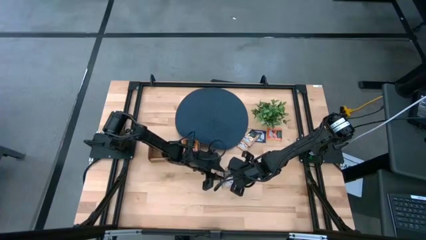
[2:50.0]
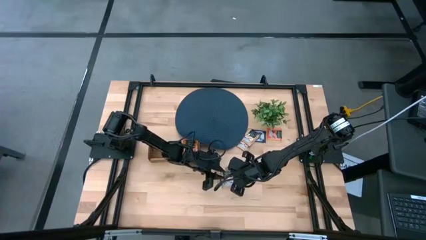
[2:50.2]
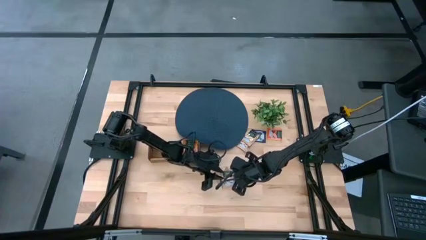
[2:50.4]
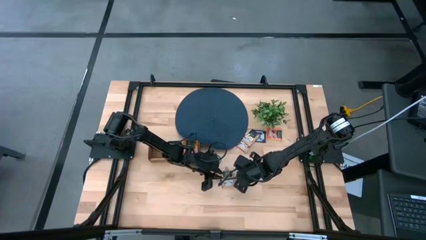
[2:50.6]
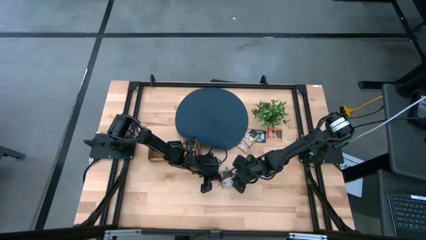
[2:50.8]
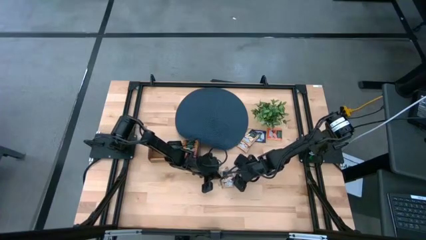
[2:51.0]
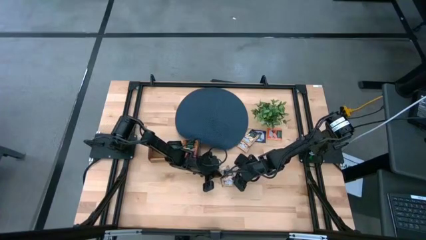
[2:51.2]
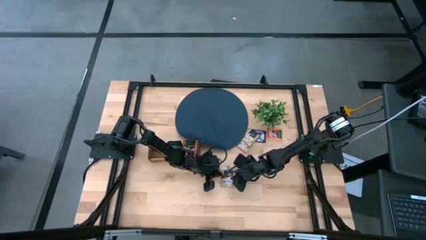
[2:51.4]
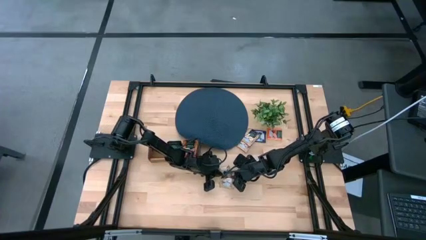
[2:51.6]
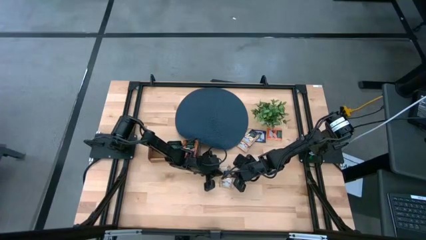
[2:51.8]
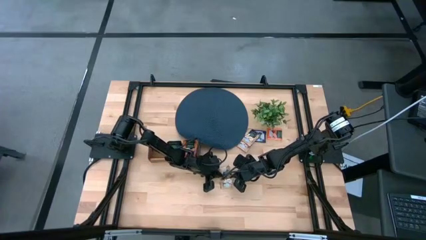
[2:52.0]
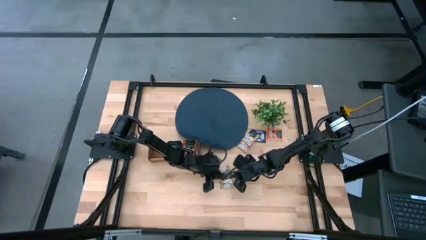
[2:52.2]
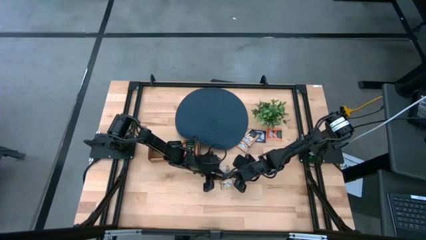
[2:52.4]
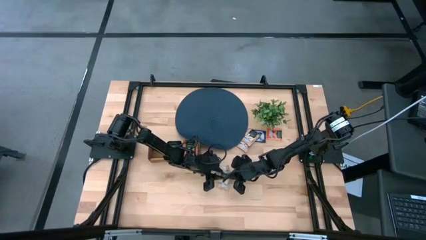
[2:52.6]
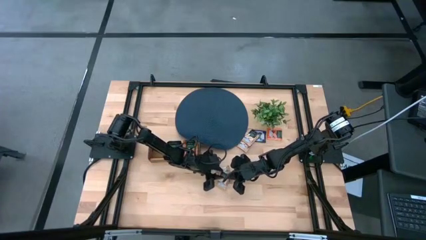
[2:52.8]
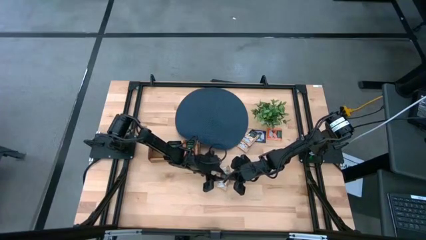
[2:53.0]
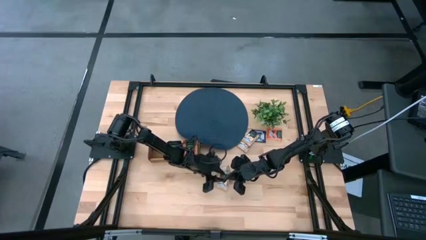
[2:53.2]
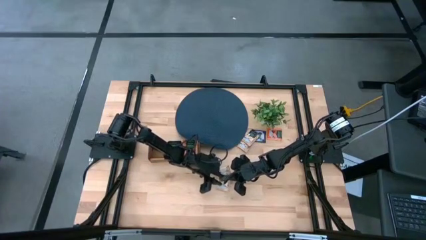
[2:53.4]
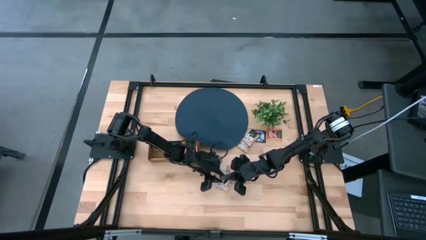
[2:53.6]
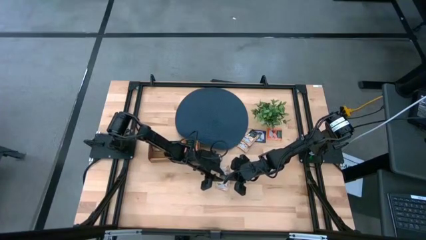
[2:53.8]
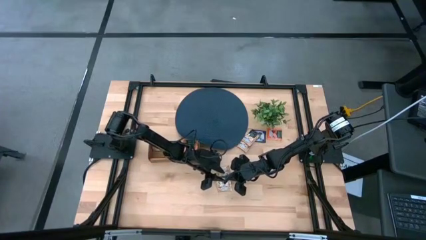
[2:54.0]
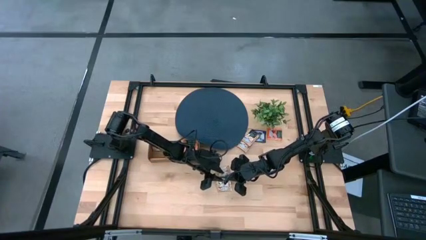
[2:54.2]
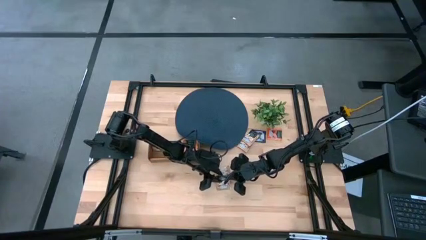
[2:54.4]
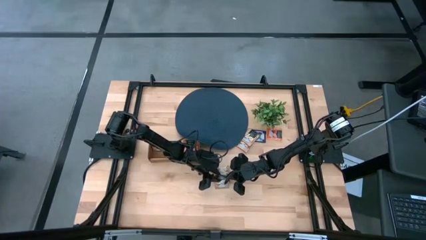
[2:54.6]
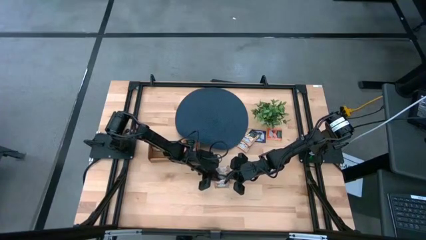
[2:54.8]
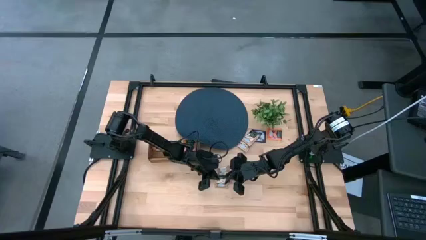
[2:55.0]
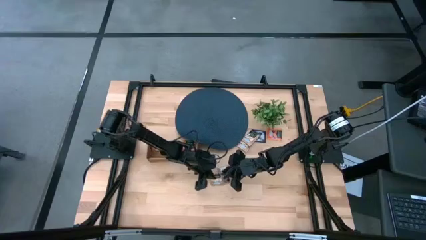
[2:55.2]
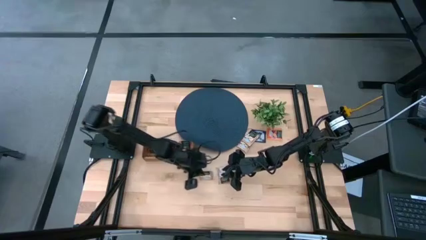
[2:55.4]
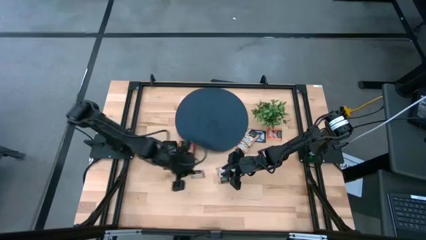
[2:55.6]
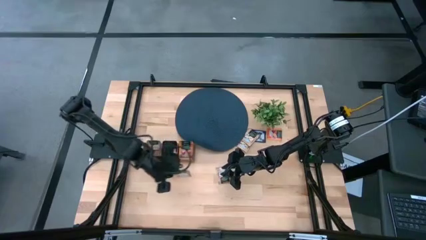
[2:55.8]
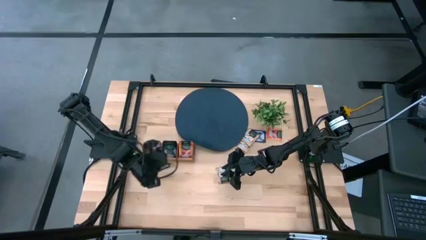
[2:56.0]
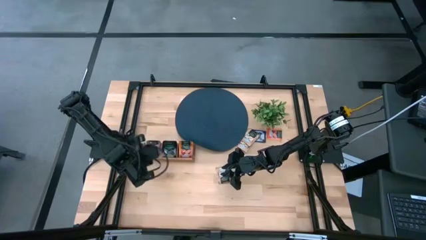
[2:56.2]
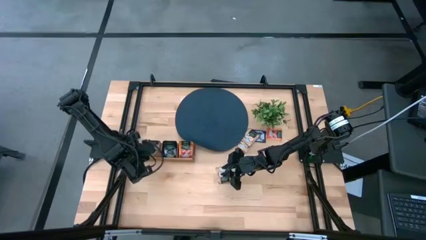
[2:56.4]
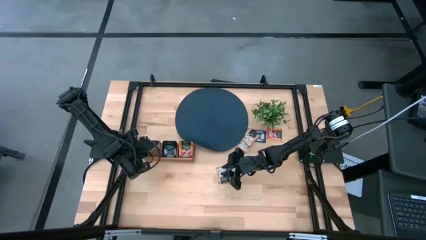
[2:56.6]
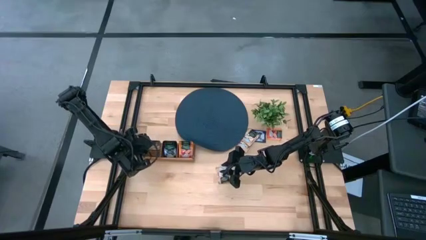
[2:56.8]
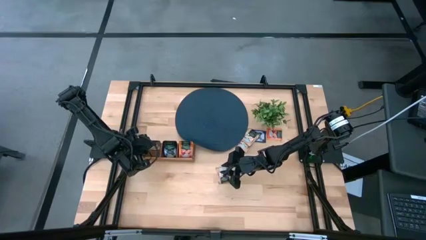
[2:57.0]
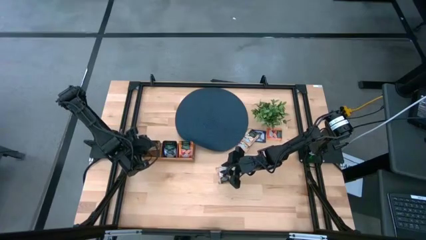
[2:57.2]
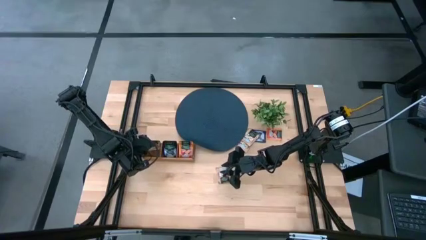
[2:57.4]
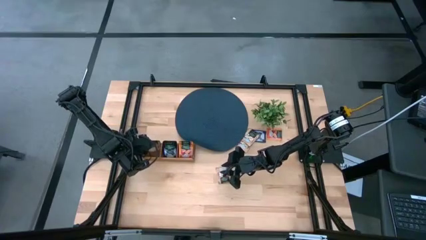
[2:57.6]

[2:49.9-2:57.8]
Task: Pick & Place Tea
Put the brown tea bag into the left section of the wooden organizer

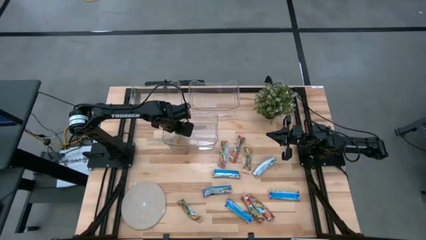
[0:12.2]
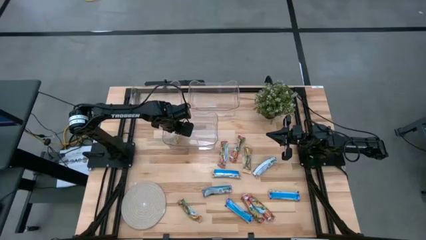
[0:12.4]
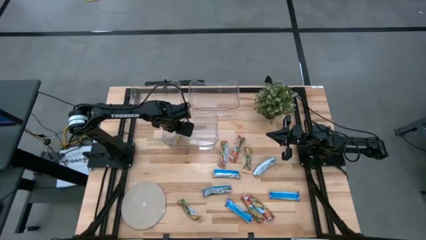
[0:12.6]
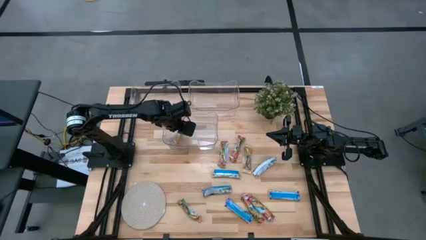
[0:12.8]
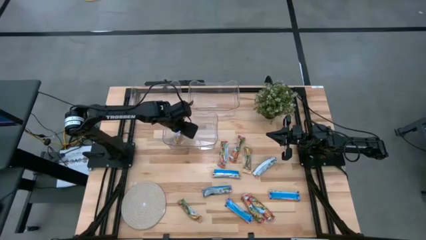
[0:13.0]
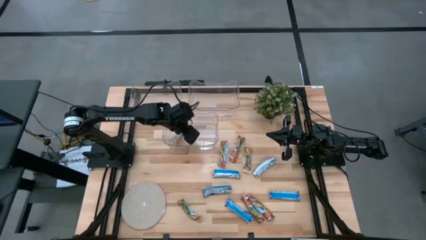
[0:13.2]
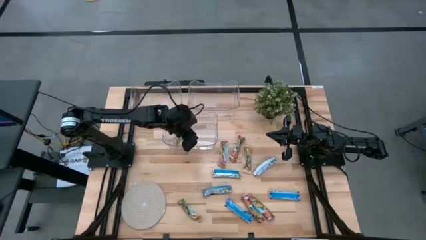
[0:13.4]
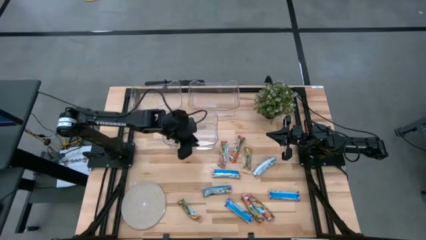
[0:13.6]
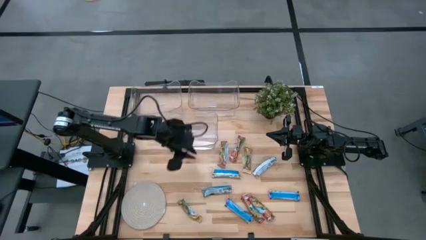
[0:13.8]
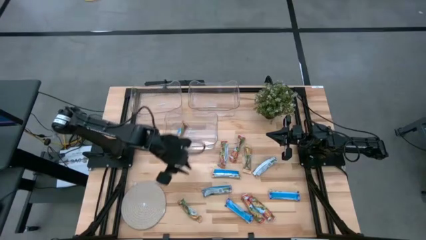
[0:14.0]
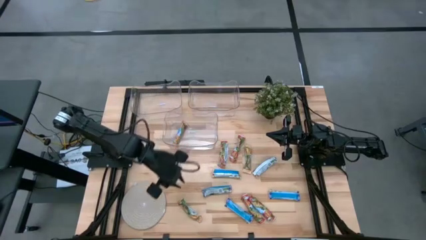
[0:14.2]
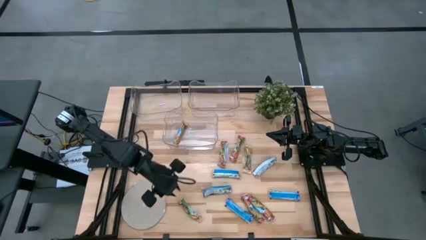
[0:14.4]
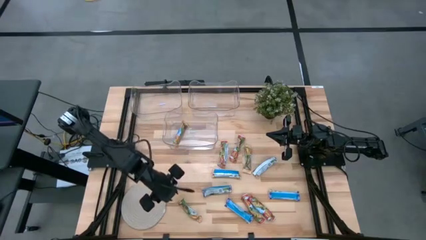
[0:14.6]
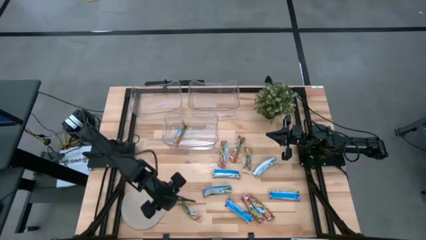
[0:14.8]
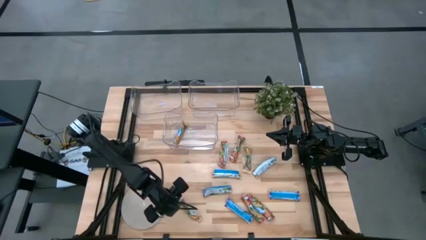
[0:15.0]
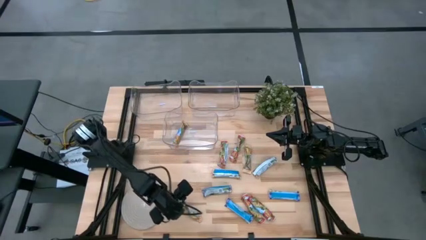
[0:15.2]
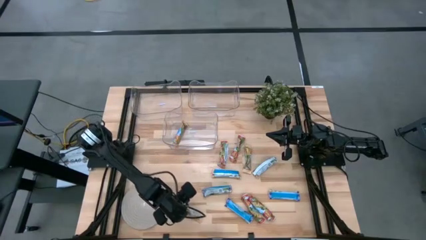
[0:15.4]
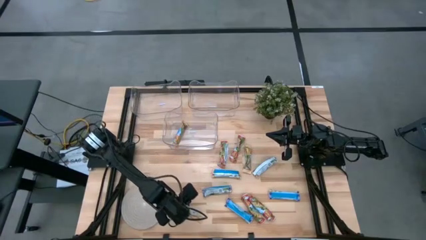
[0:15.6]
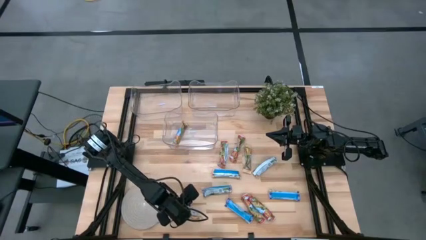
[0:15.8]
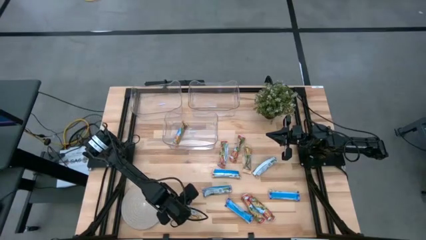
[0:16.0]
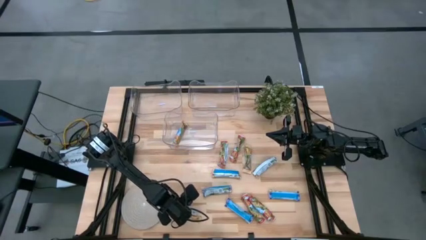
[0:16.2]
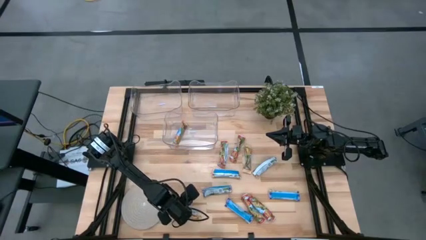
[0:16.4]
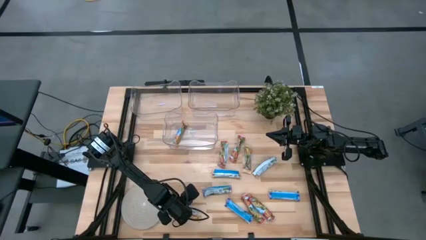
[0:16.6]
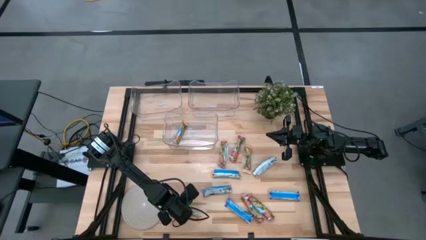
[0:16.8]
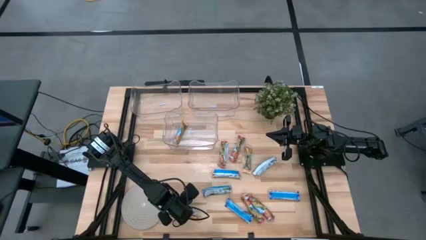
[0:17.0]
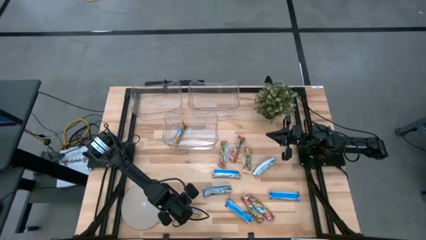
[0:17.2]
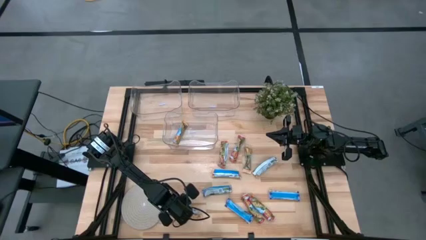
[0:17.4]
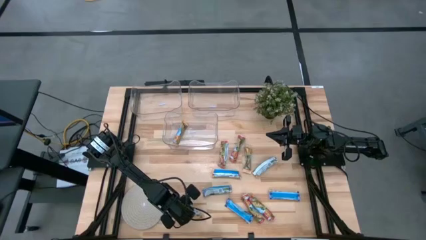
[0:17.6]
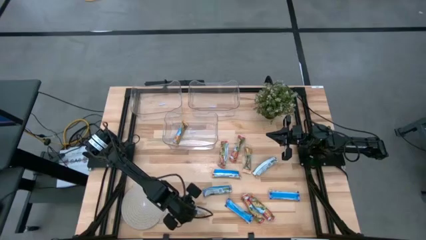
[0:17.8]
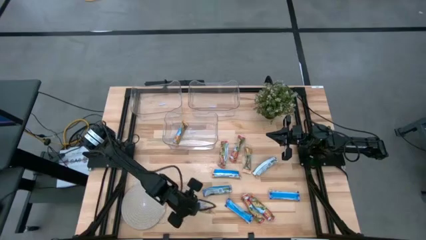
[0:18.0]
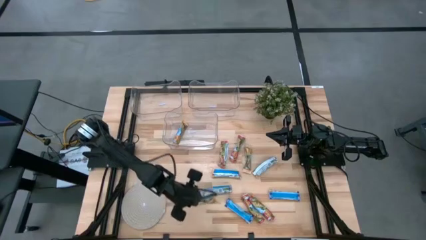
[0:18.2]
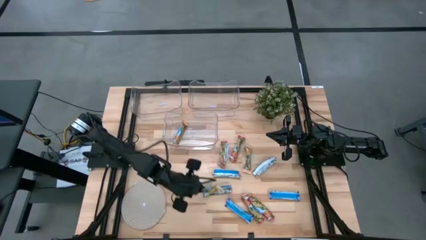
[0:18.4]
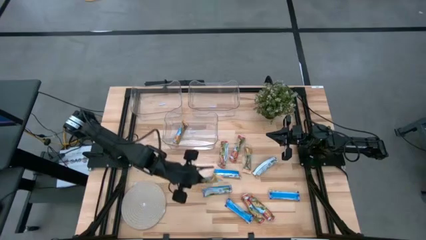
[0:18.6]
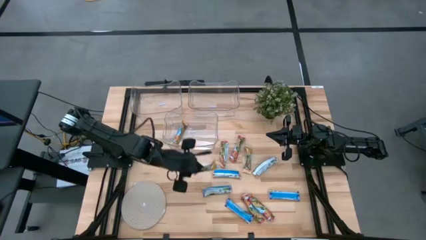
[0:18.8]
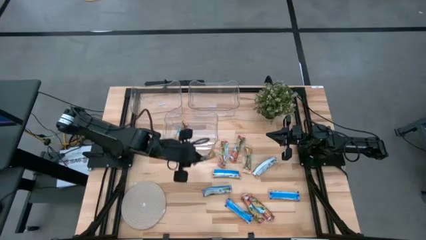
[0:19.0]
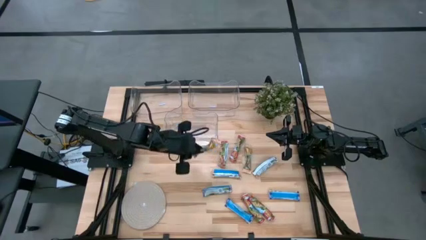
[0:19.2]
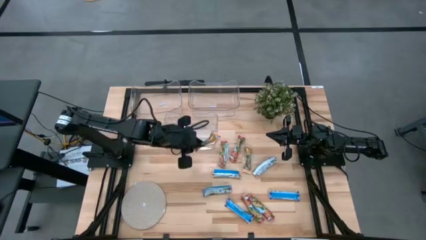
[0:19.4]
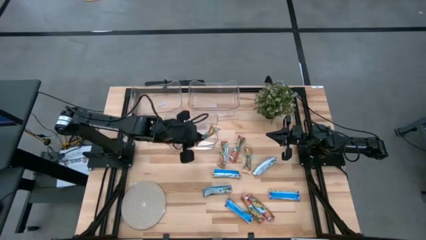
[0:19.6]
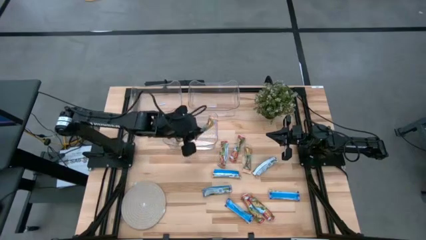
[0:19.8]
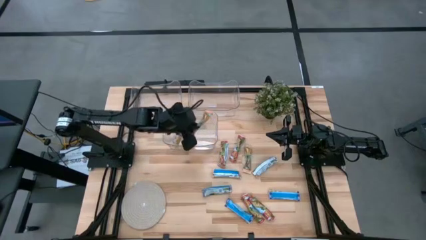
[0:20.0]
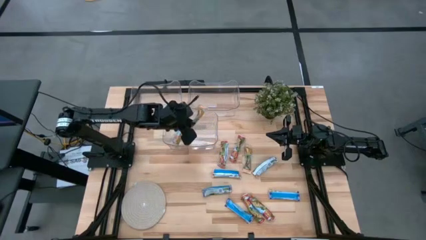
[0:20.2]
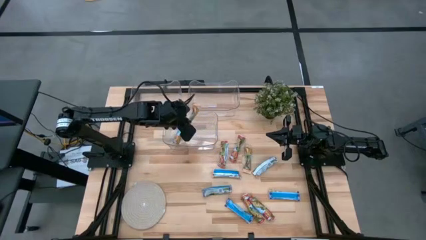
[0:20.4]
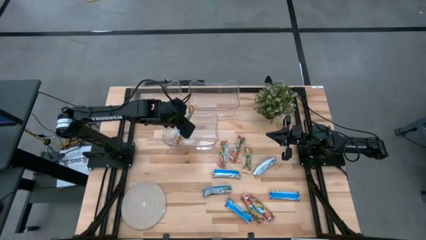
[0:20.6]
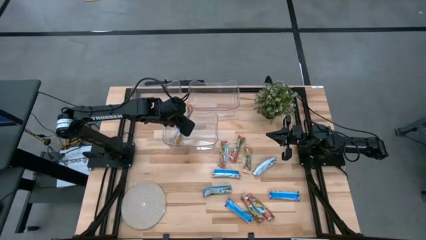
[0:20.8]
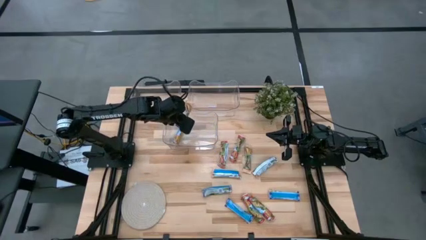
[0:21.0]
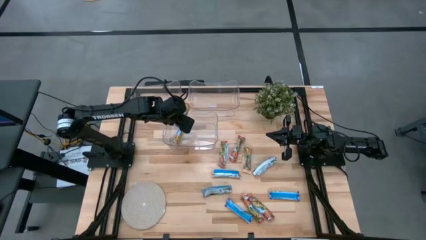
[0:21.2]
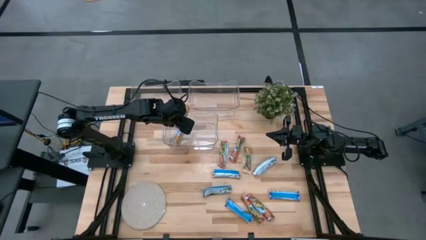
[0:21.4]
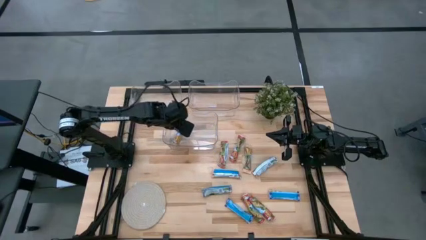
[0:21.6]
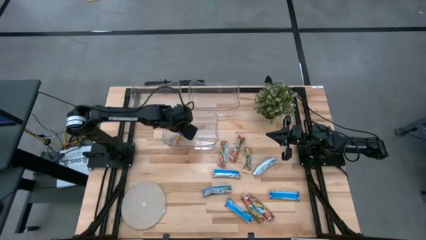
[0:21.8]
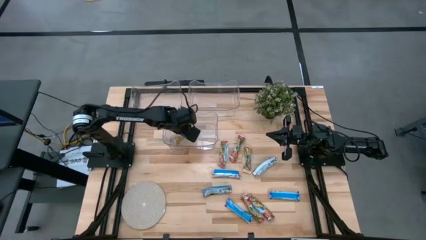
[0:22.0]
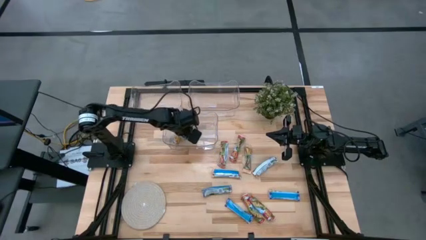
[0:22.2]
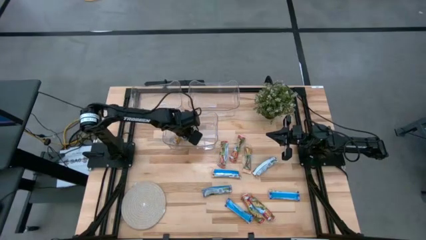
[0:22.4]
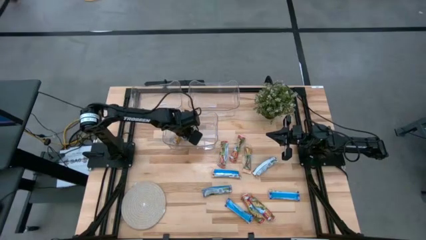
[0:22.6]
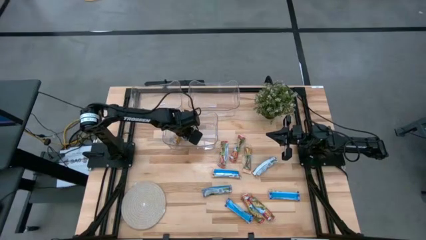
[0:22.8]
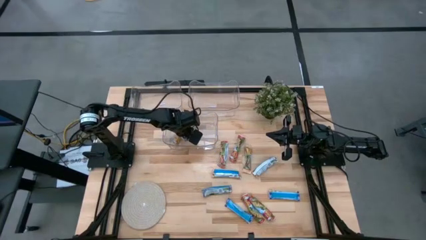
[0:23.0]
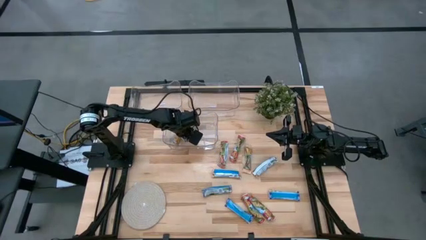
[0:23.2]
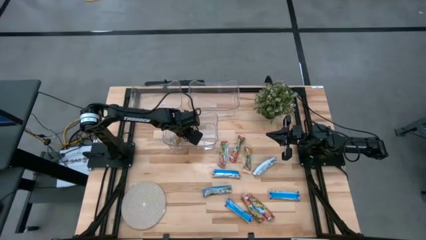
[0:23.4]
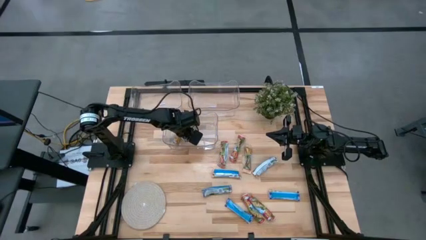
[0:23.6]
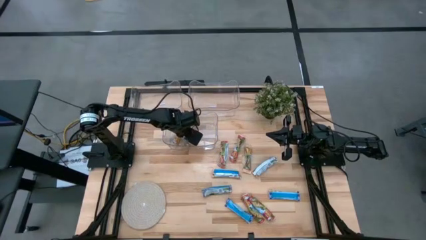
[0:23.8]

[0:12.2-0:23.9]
Task: Pick and place Granola Bars by type
Put the orange granola bar into the bottom transparent bin
